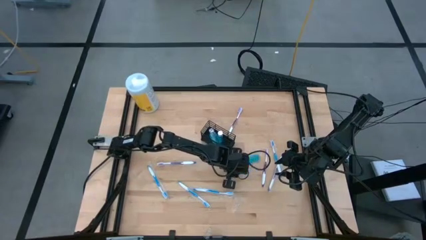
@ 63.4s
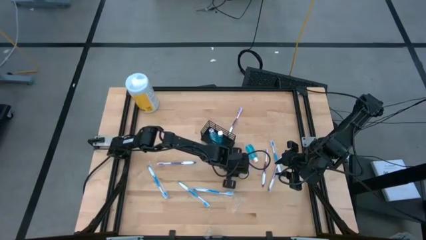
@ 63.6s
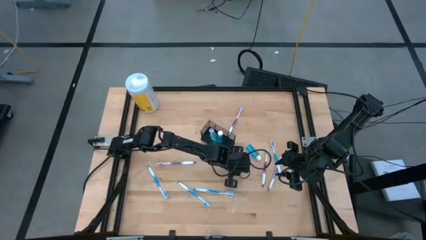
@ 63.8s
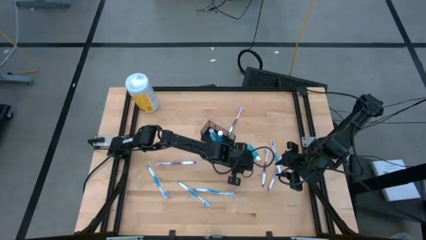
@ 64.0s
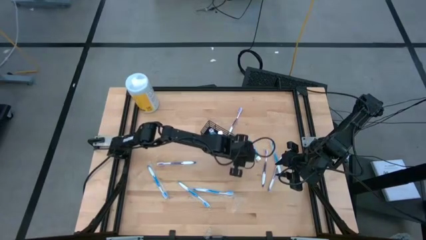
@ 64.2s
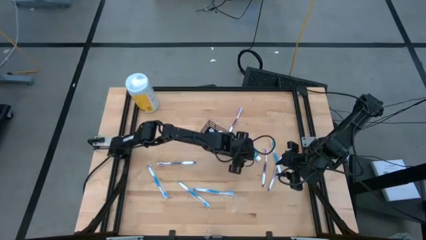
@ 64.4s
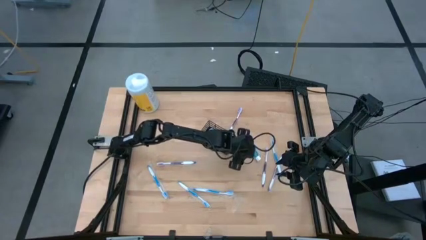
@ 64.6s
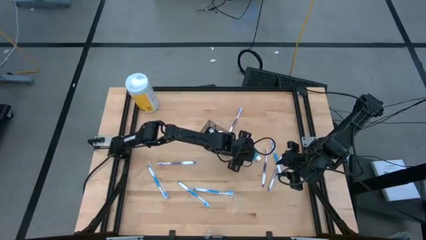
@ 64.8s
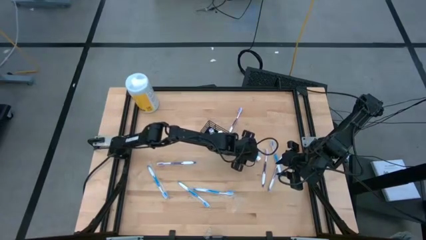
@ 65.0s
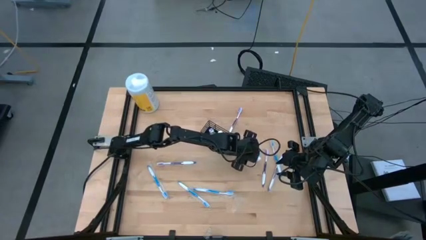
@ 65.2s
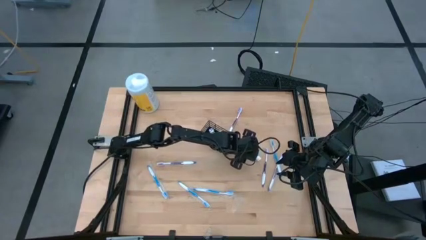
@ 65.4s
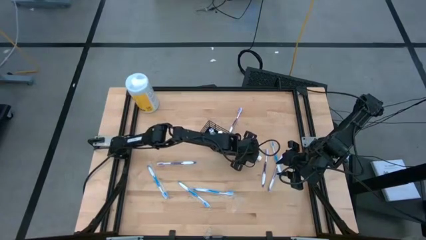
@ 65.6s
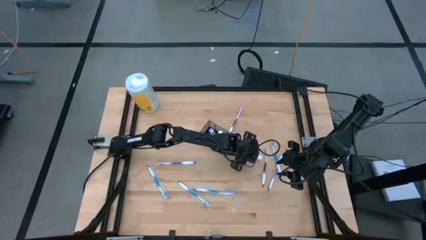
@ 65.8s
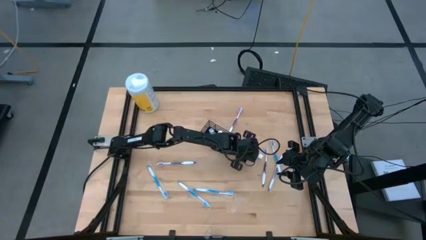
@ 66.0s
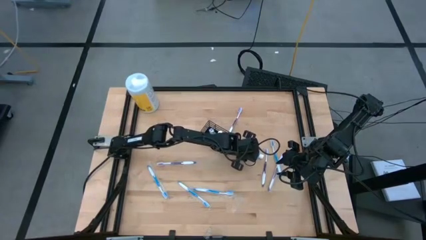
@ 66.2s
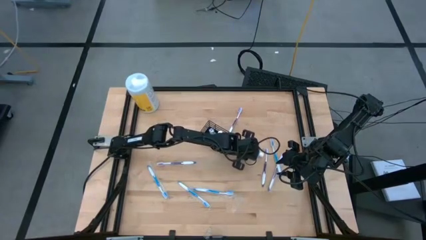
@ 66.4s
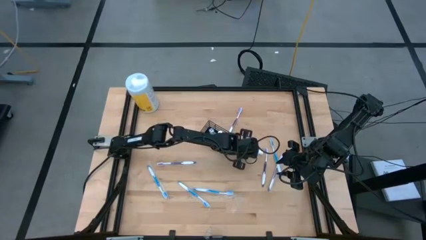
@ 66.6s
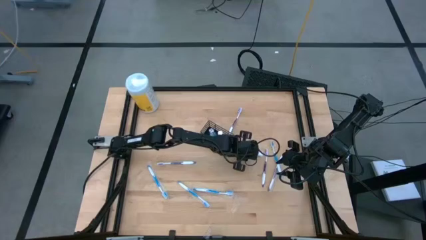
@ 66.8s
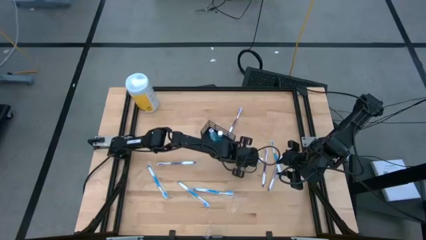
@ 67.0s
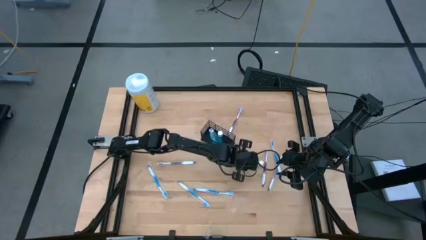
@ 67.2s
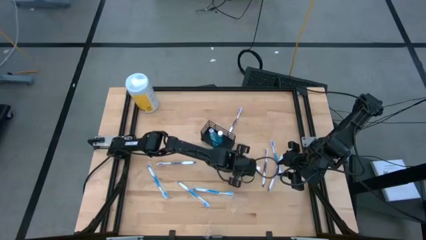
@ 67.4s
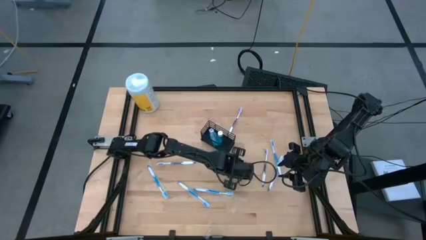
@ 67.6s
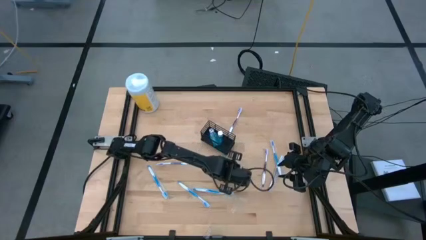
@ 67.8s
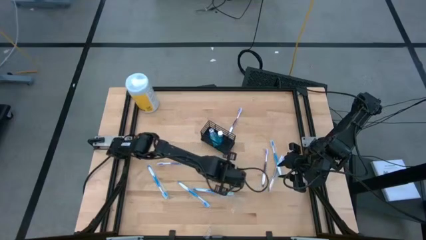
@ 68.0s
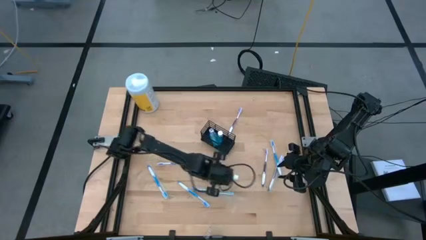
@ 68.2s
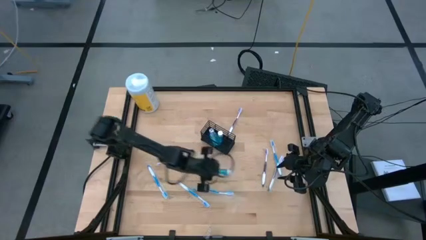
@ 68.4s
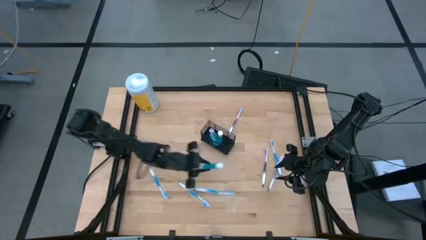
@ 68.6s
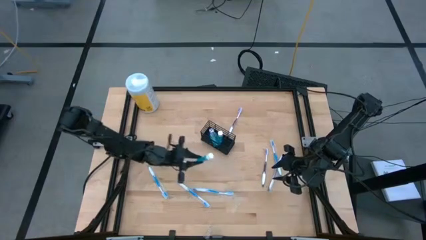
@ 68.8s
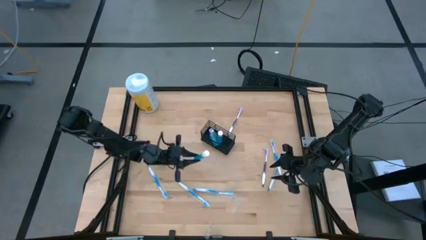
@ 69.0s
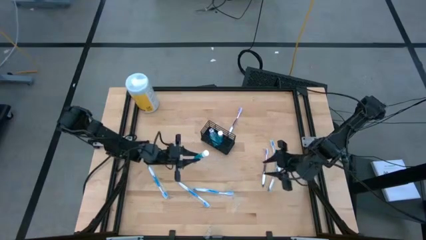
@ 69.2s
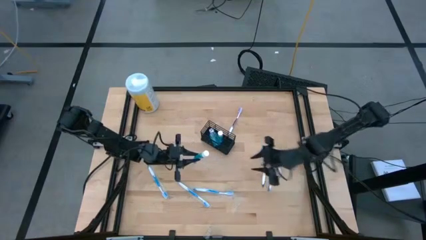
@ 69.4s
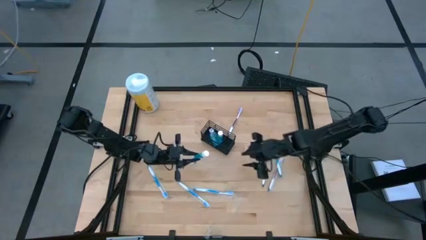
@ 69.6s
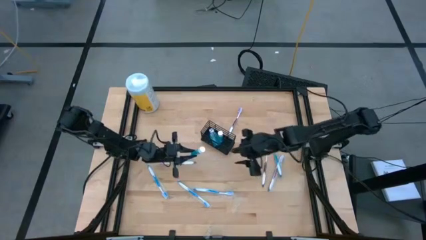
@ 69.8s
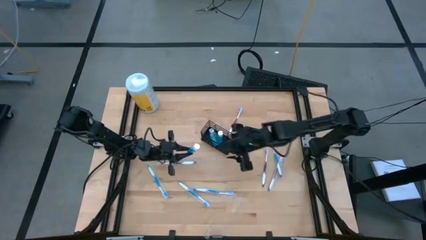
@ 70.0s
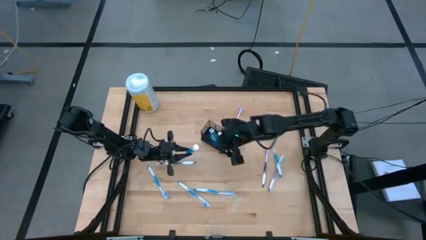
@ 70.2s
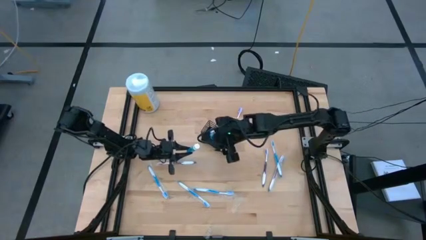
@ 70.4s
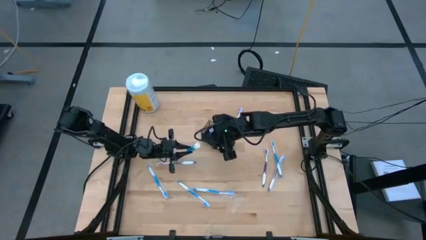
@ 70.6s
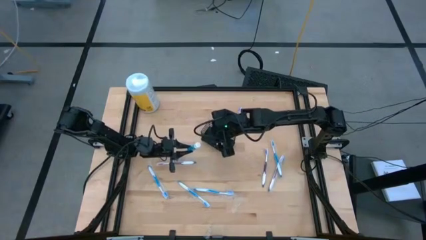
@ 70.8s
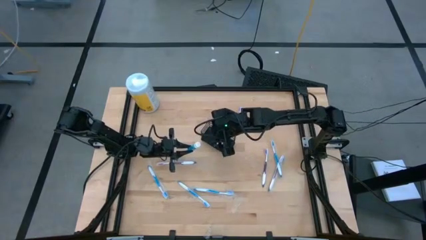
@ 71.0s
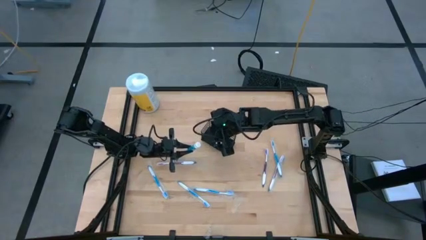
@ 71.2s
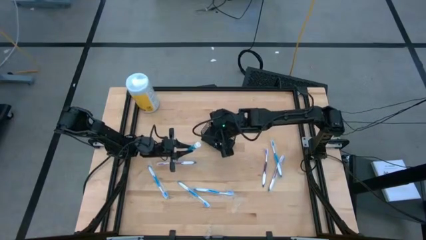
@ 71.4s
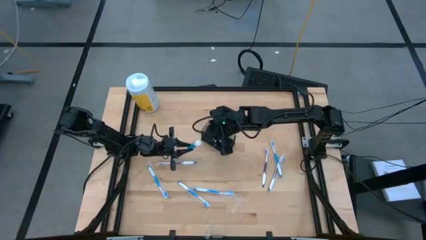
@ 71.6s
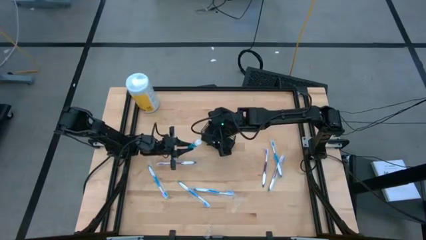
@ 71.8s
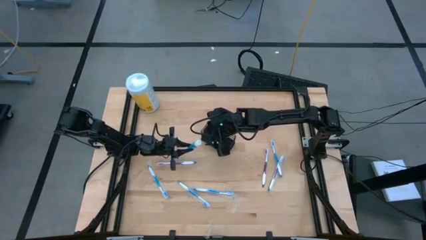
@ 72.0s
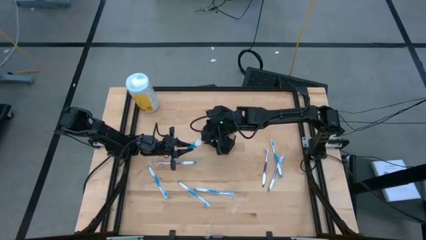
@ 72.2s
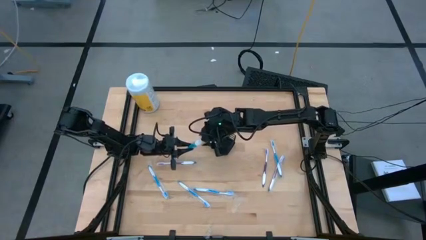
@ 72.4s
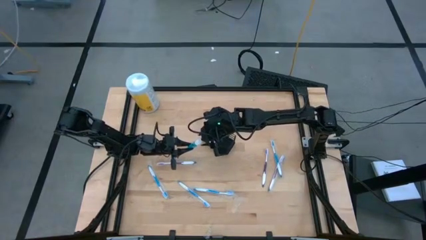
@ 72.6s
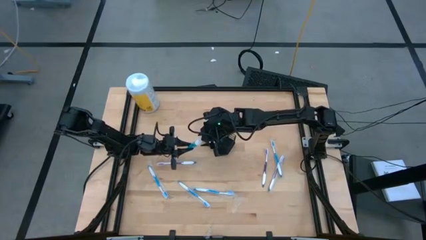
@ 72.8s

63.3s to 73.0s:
Task: Pick & Place toothbrushing station
Put the blue mouthwash into the wire organizer

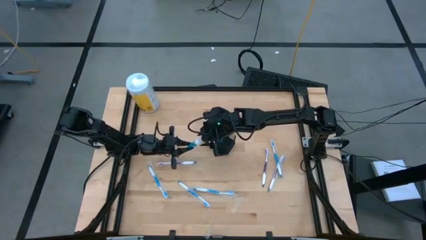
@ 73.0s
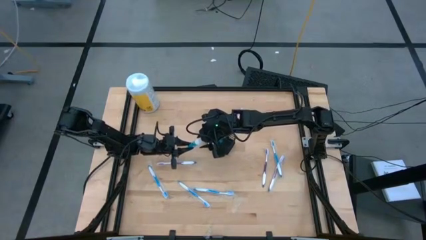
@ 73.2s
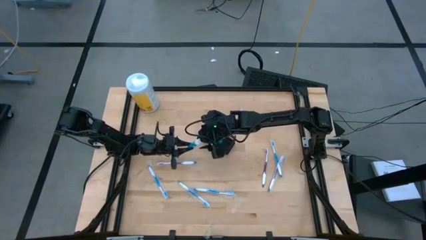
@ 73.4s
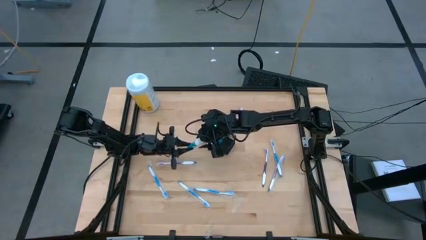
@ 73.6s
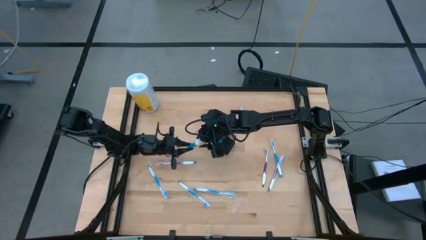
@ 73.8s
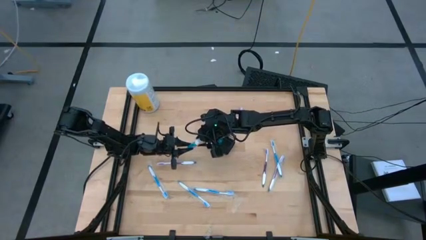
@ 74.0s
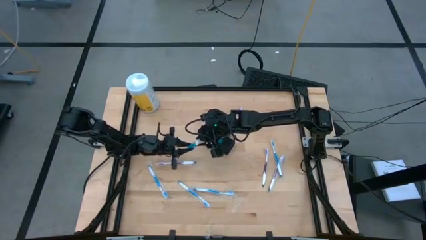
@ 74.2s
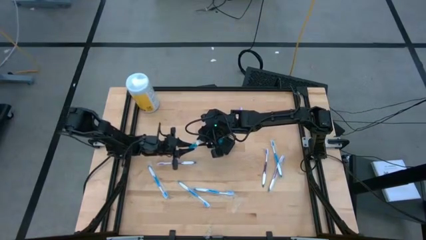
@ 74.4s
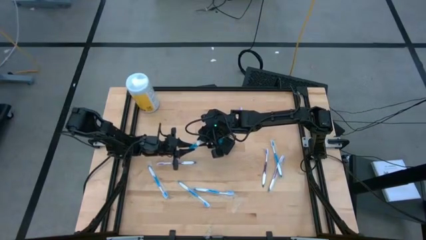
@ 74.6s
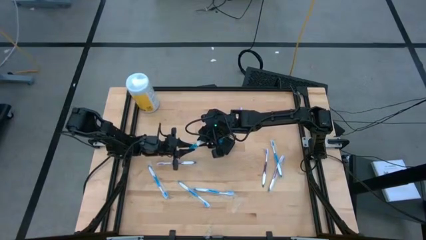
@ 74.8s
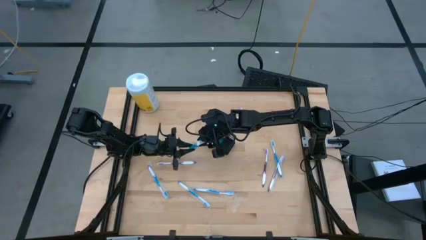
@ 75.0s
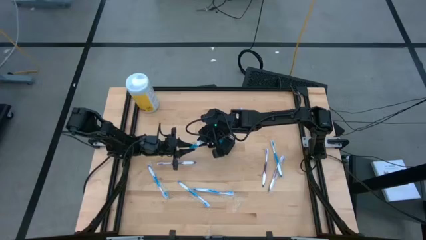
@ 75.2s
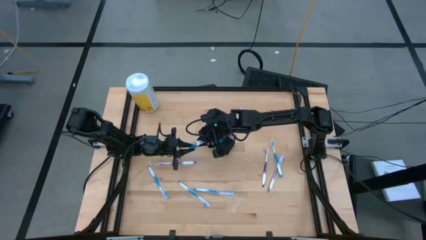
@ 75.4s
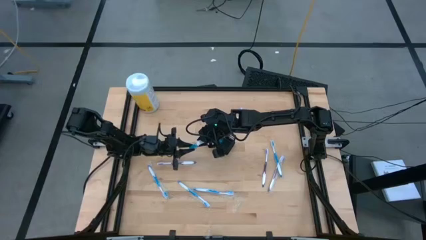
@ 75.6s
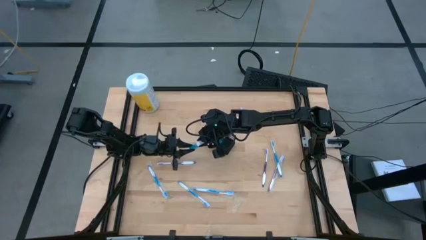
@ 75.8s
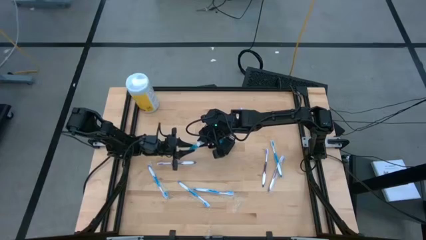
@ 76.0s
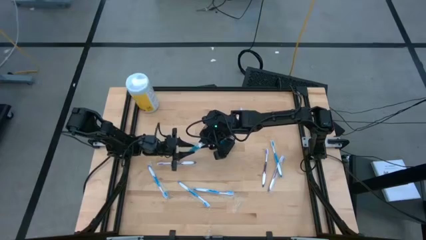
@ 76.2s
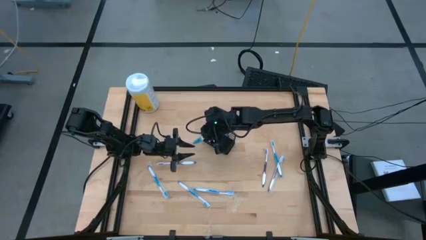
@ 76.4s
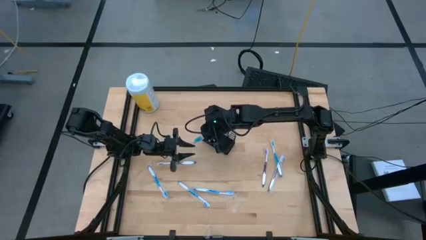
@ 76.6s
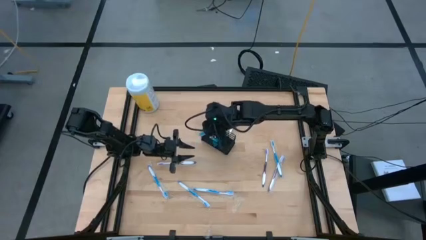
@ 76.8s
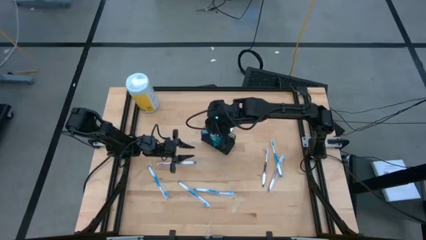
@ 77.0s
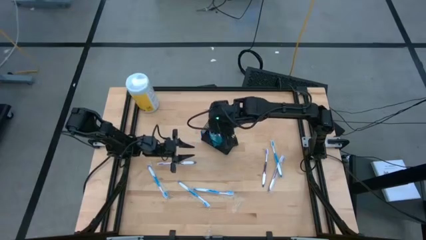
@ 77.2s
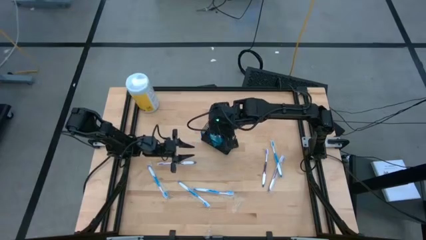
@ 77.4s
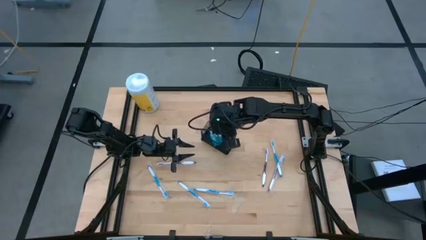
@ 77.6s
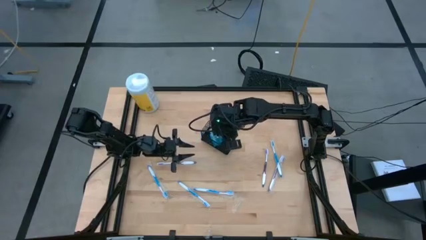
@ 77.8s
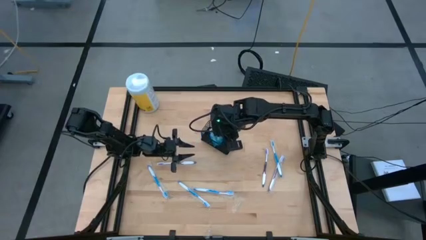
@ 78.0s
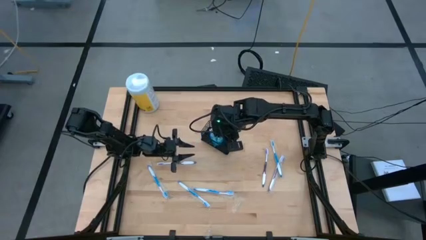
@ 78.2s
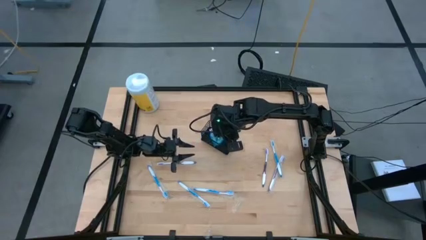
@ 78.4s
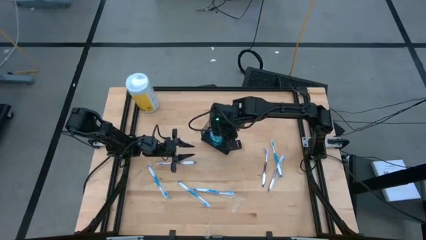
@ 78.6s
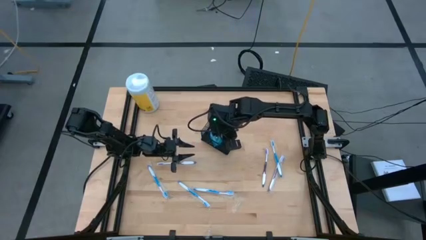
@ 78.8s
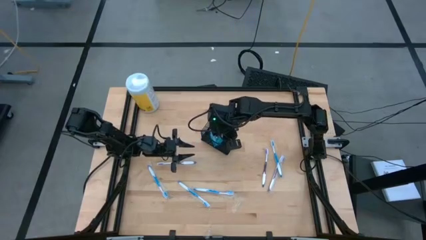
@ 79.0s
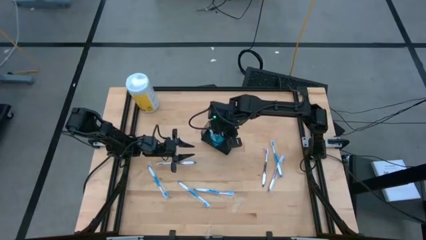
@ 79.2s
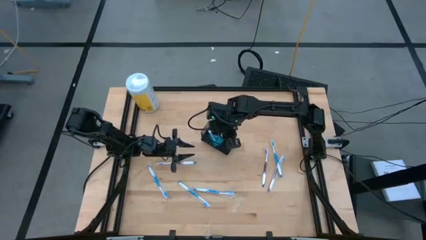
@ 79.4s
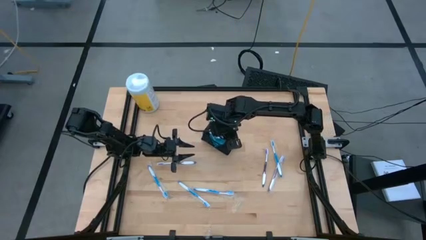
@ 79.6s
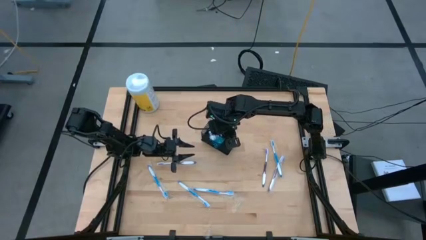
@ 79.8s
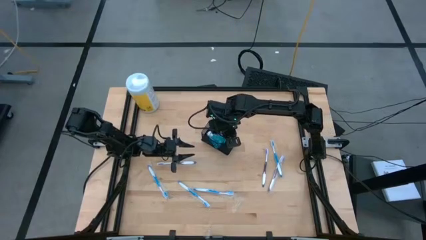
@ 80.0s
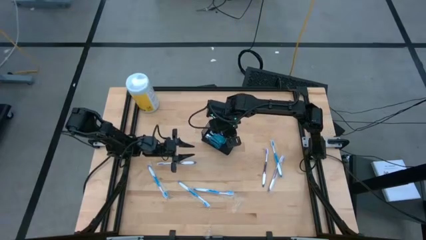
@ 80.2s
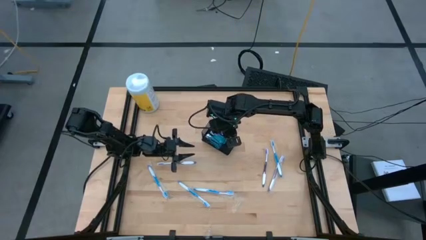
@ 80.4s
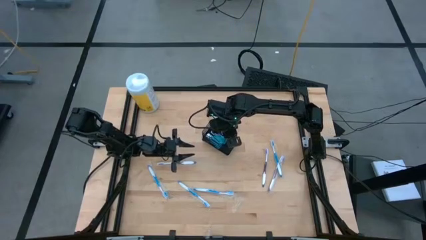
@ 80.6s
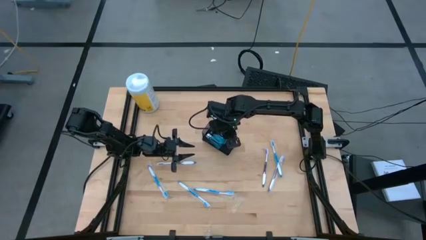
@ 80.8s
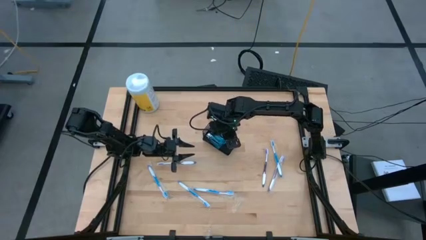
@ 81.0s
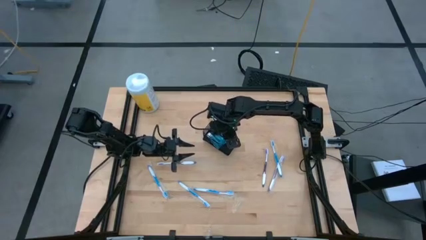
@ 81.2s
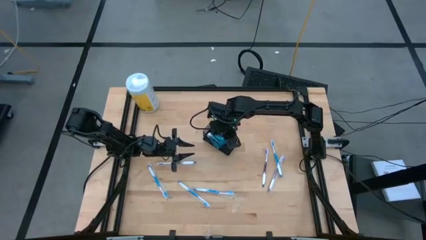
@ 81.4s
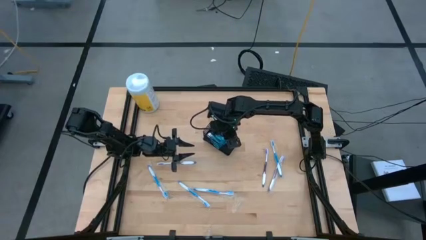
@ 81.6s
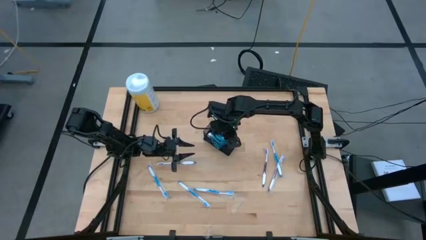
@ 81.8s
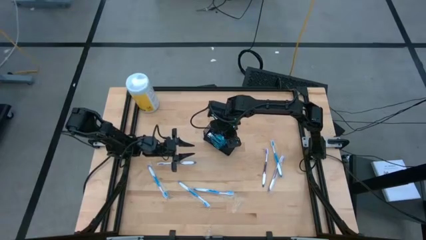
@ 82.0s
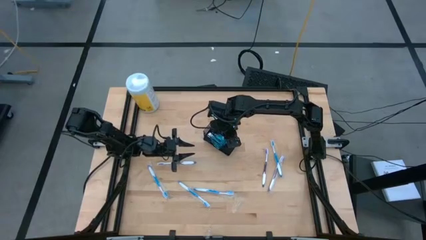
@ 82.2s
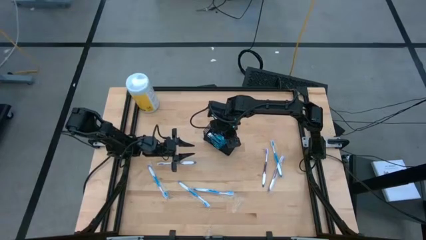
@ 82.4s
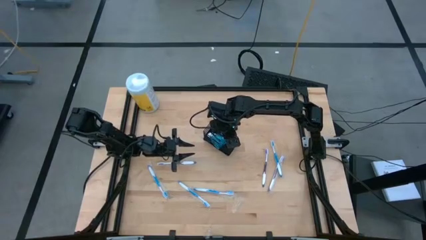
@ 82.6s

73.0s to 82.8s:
Put the blue mouthwash into the wire organizer
